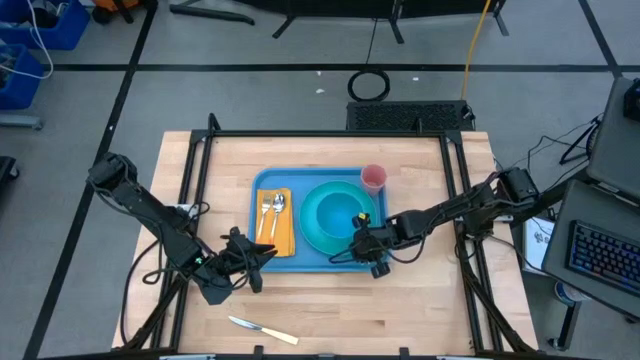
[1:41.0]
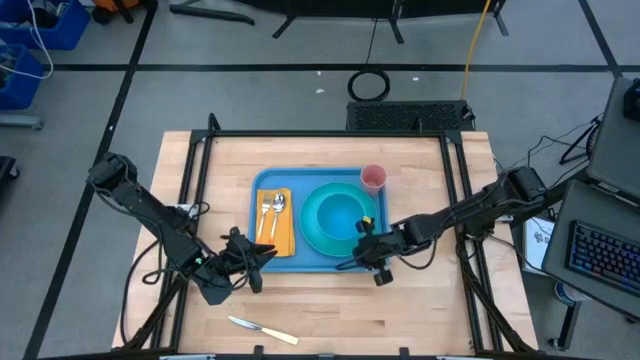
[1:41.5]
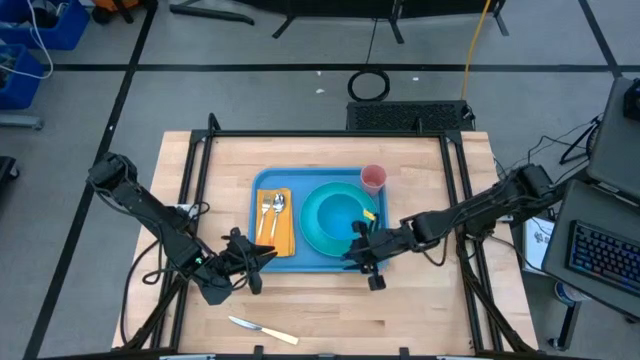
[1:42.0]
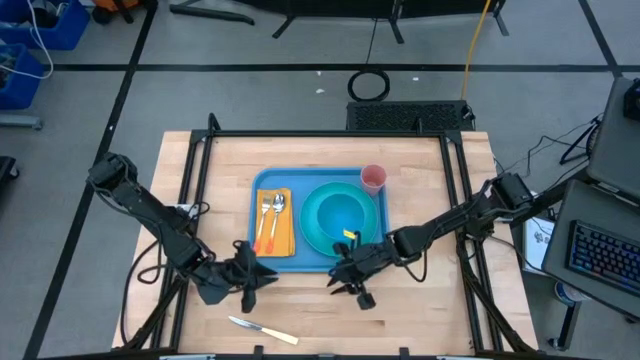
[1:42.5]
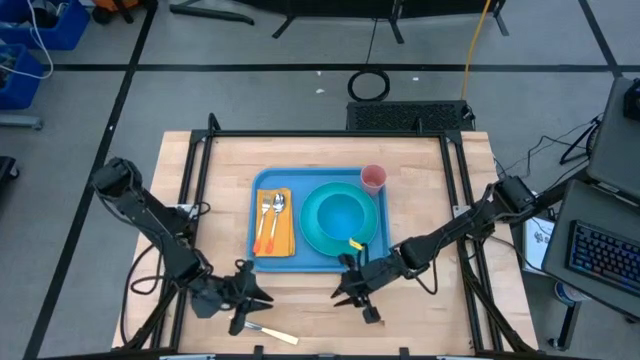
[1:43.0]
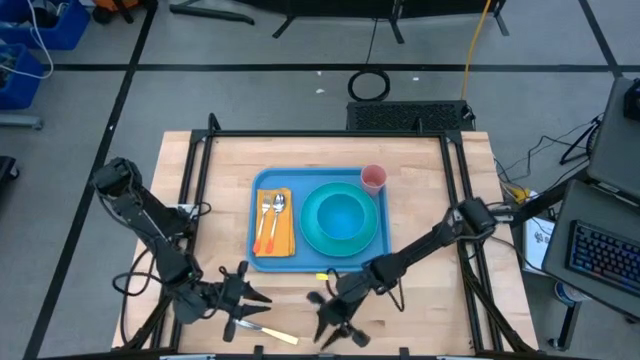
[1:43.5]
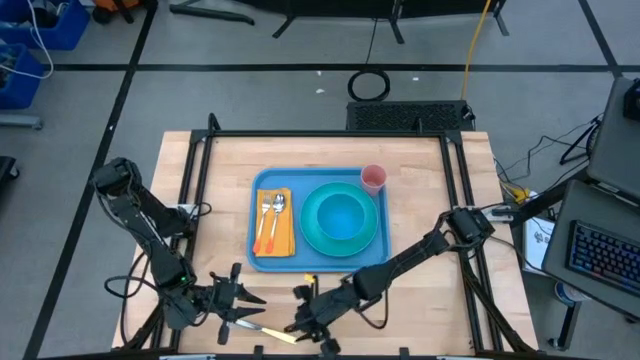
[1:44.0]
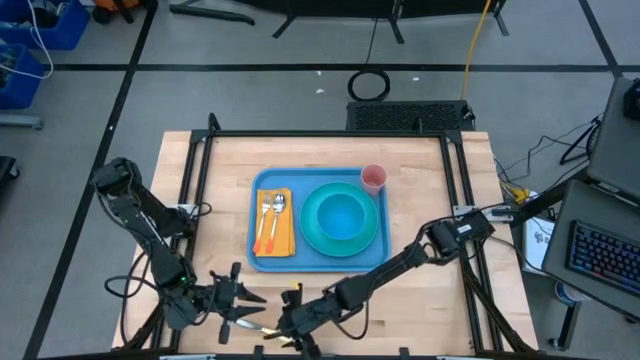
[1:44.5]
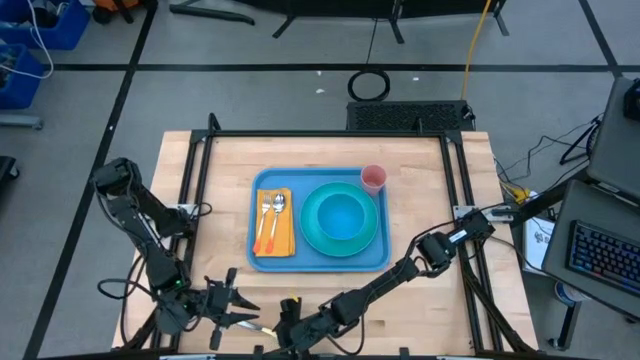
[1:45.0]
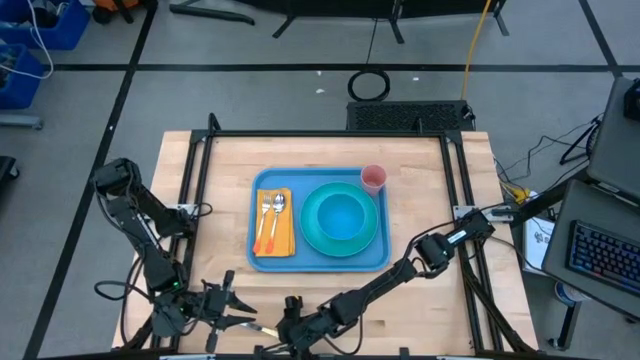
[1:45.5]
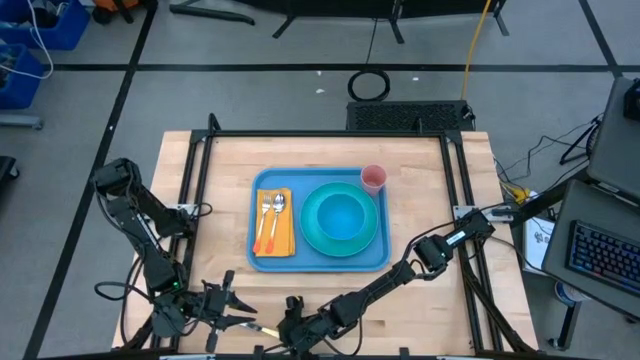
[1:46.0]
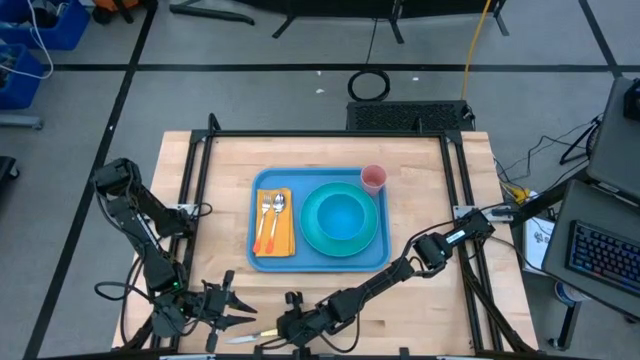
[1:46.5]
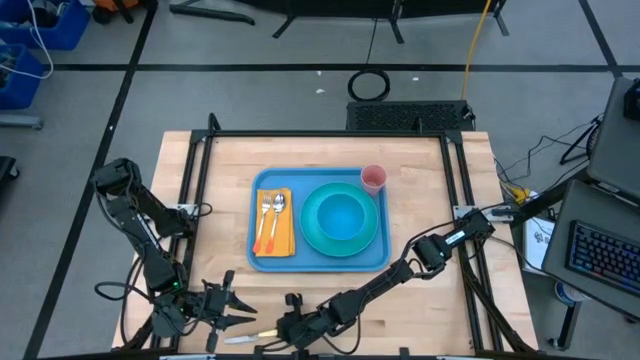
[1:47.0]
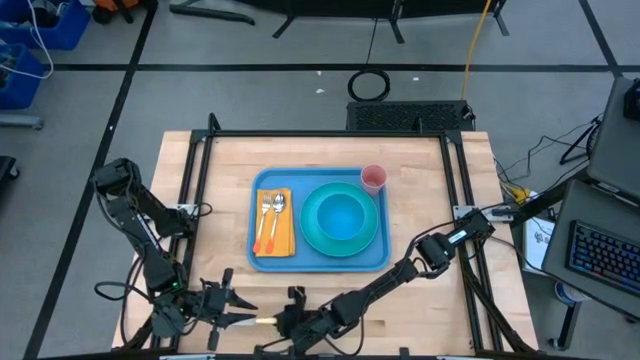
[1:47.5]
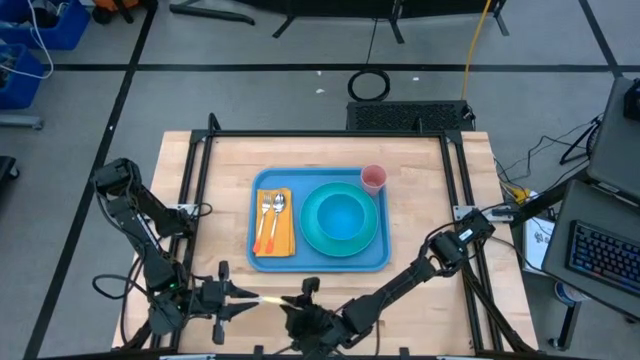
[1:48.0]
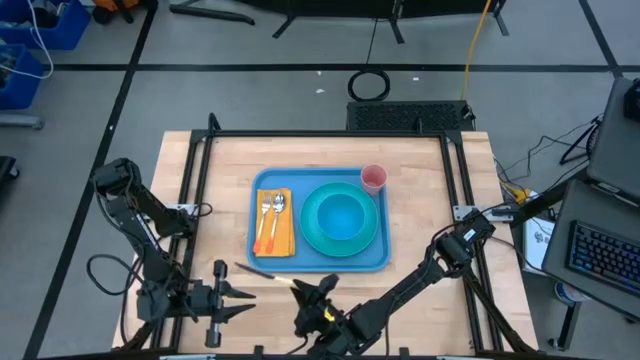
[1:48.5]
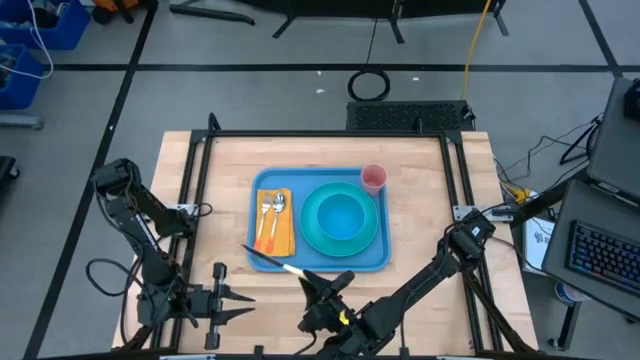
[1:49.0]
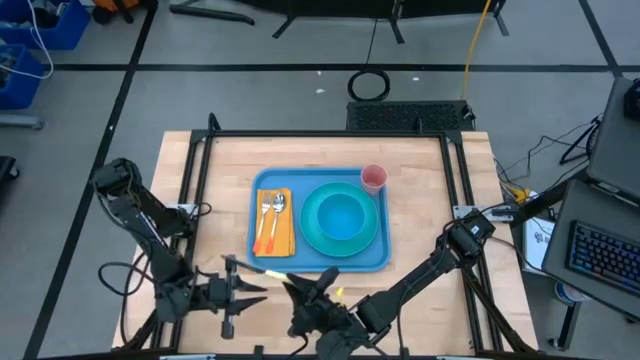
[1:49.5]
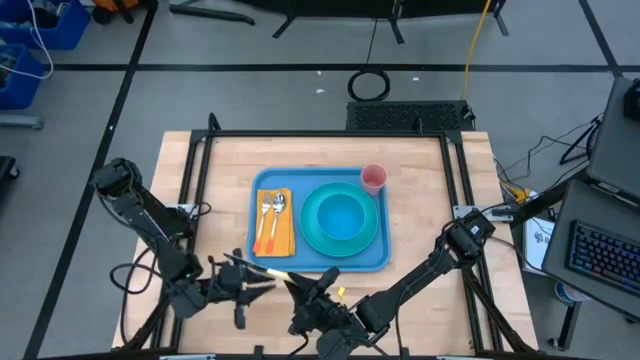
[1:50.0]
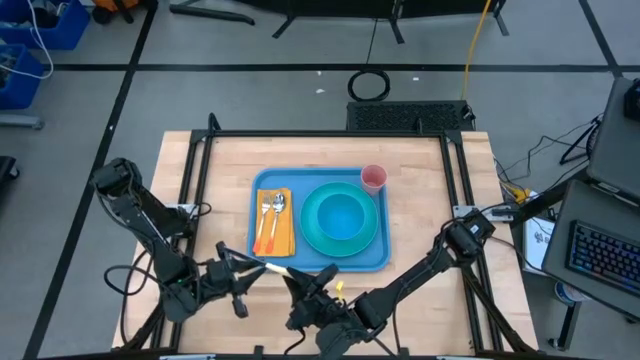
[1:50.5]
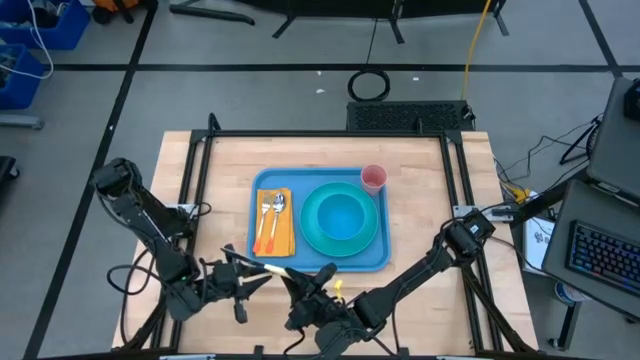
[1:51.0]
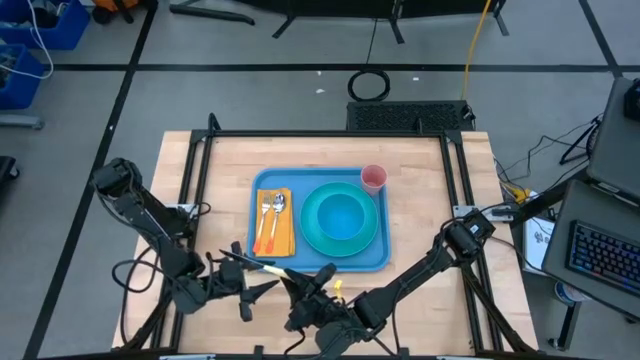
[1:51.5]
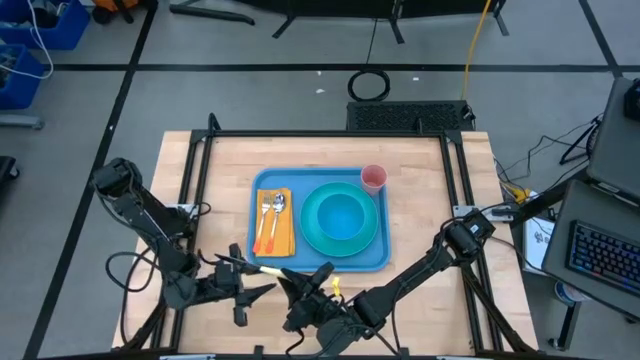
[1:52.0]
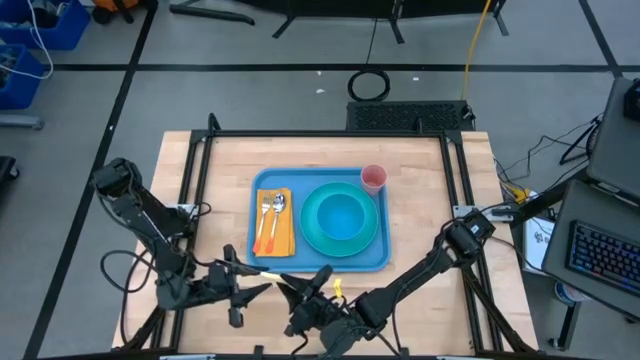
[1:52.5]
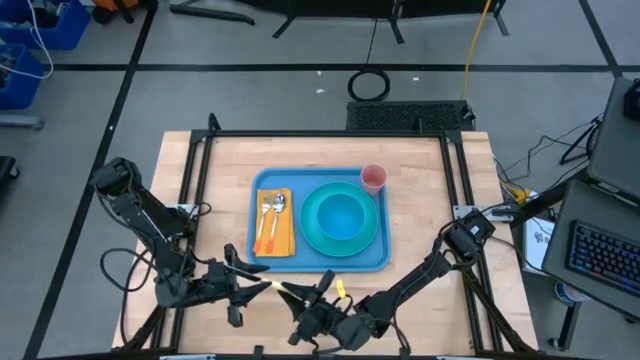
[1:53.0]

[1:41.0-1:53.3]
Task: Set up tray
Put the orange knife on the yellow napkin

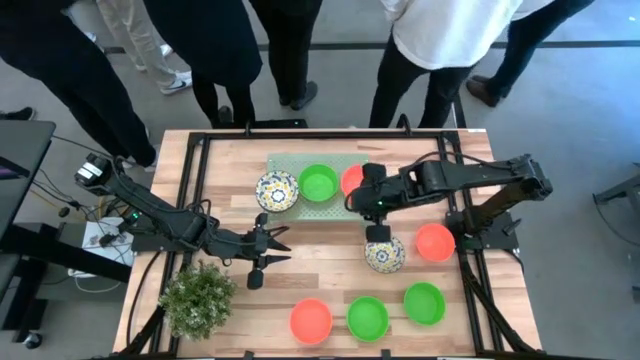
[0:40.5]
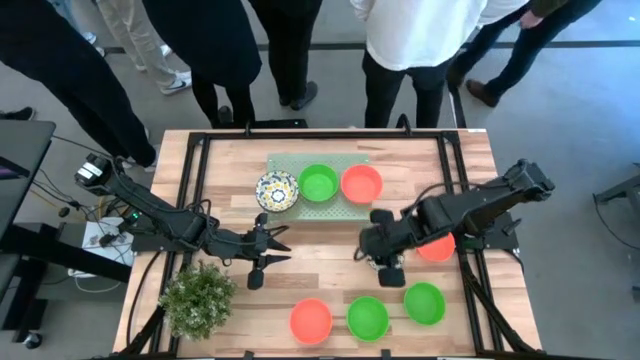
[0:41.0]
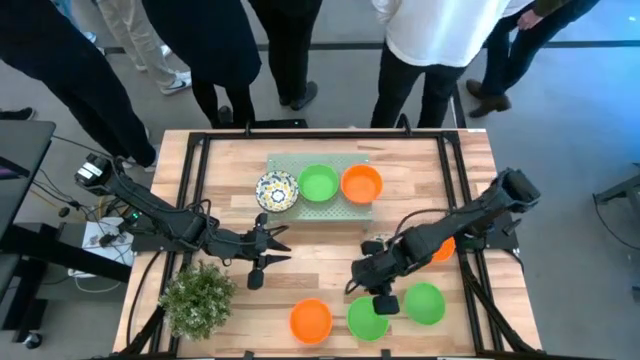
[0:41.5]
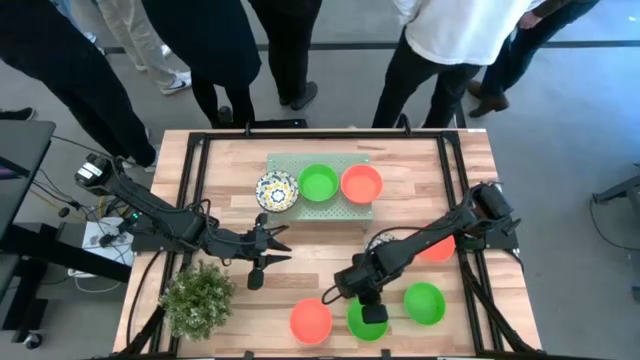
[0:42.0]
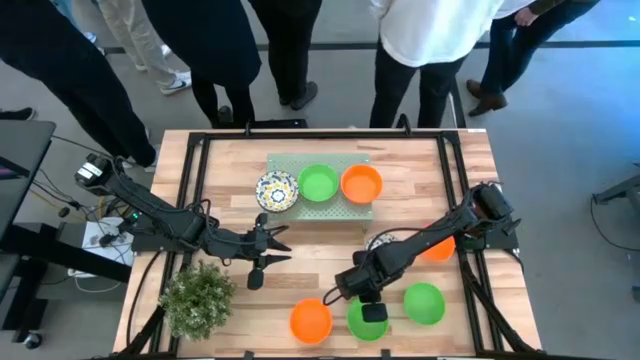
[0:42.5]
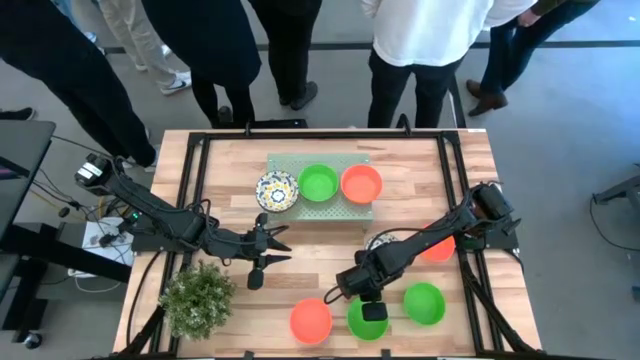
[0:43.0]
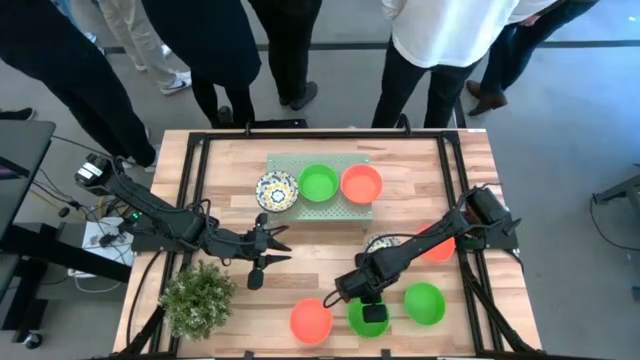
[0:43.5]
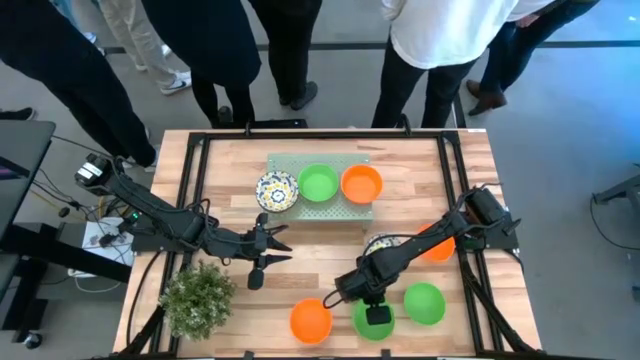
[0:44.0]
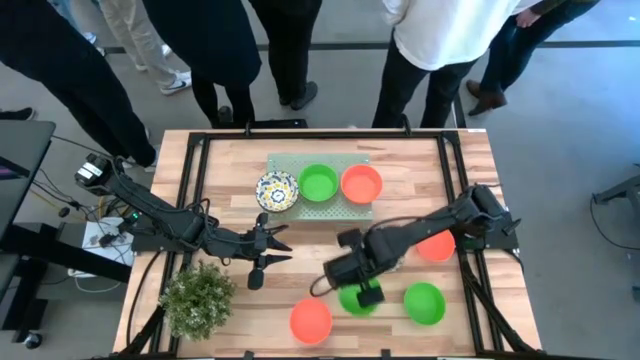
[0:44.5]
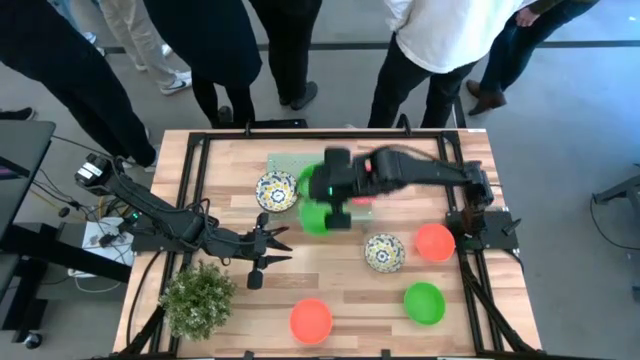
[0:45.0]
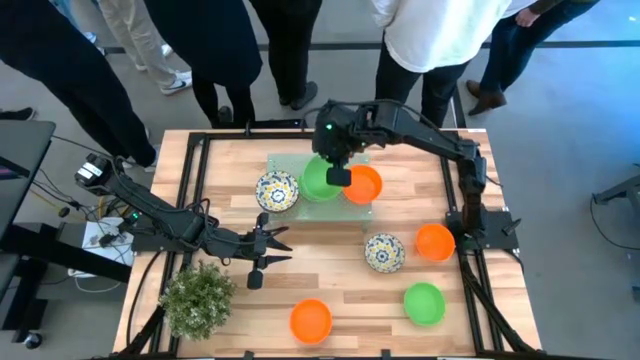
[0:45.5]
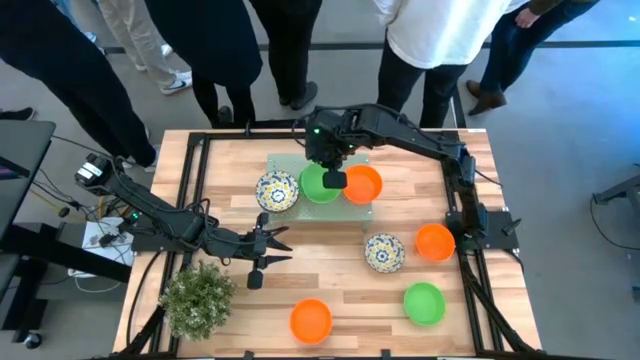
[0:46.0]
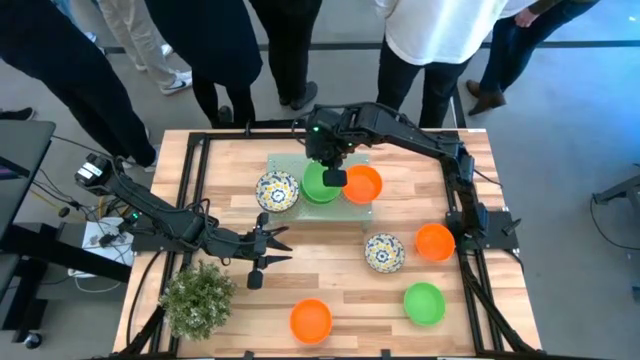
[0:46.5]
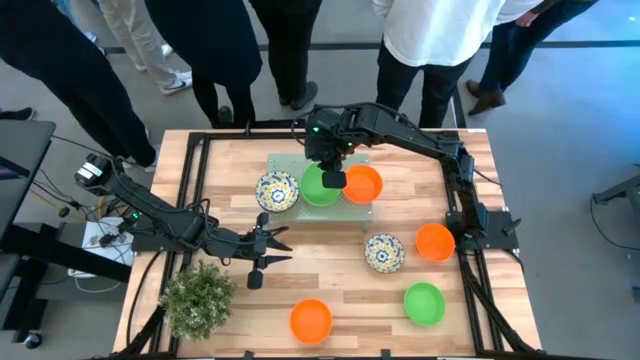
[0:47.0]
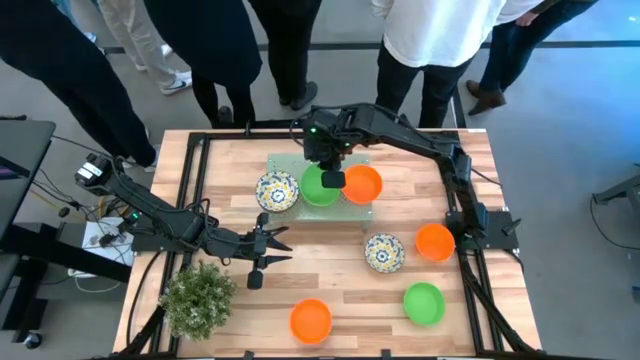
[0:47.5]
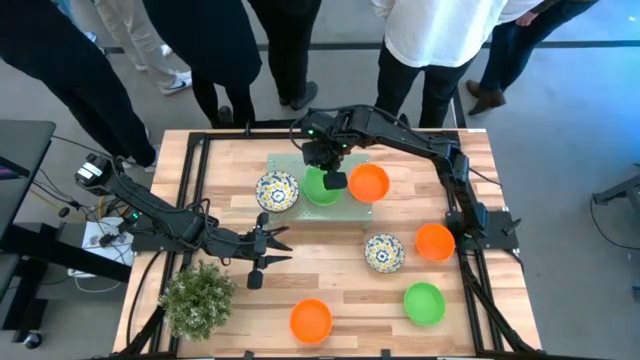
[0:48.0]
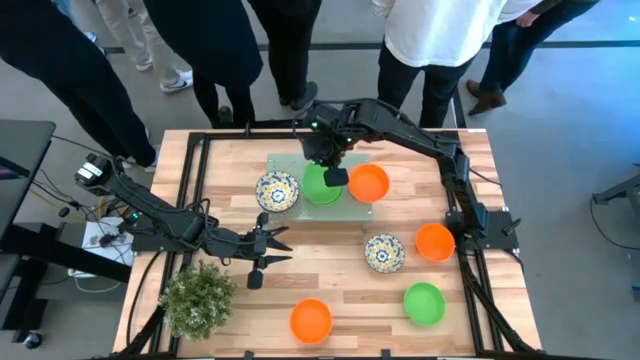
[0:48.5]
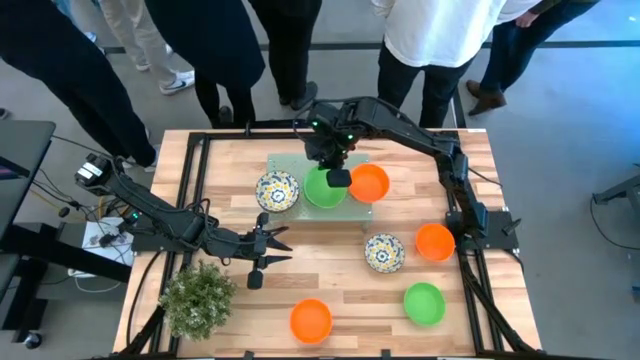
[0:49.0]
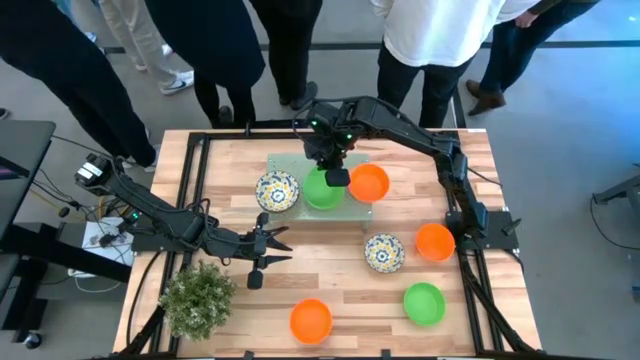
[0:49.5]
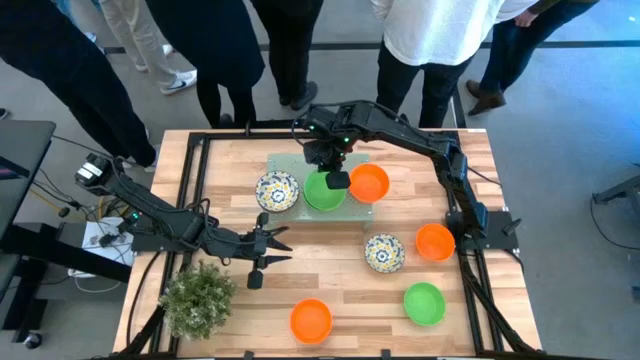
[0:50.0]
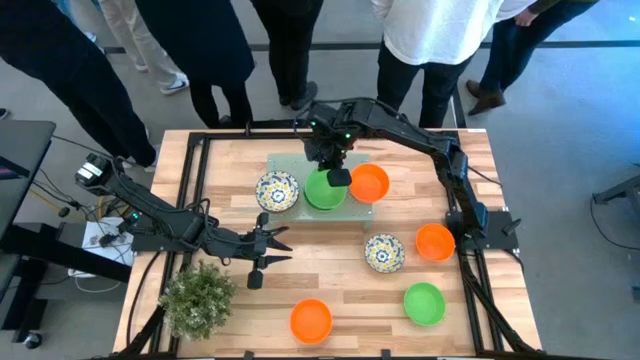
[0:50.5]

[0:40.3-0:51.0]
Task: Pick & Place Mini bowls
Stack the green bowl on top of the green bowl on the shelf
